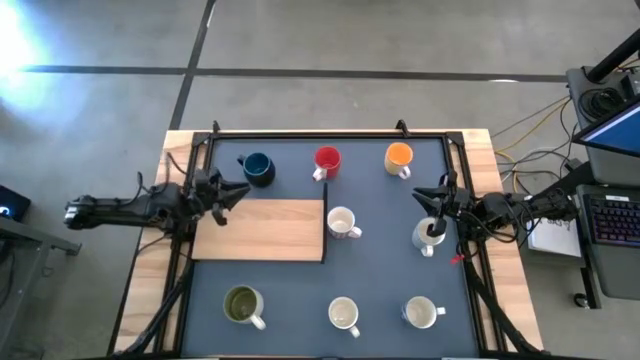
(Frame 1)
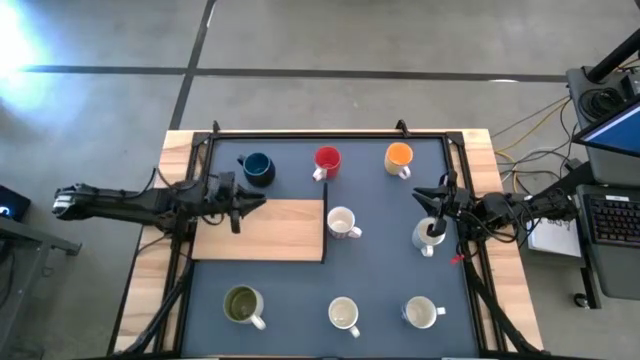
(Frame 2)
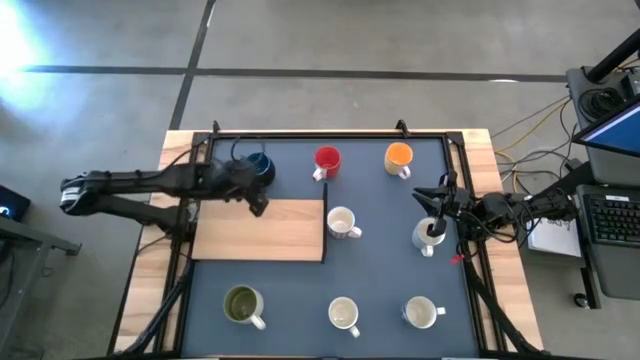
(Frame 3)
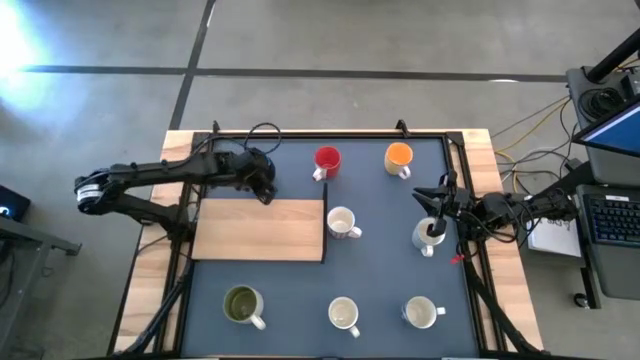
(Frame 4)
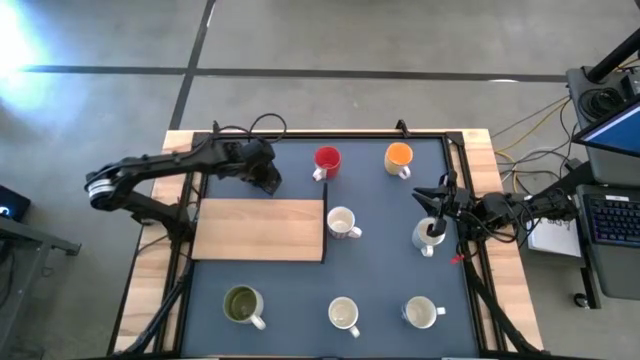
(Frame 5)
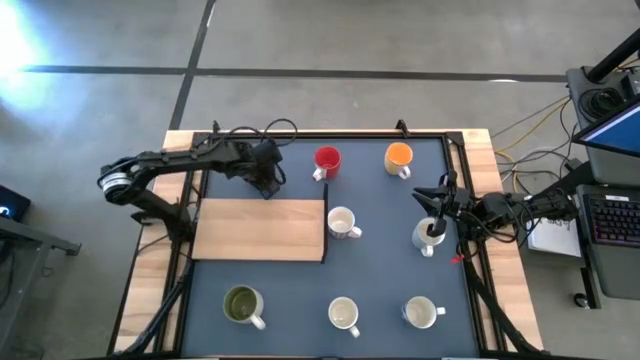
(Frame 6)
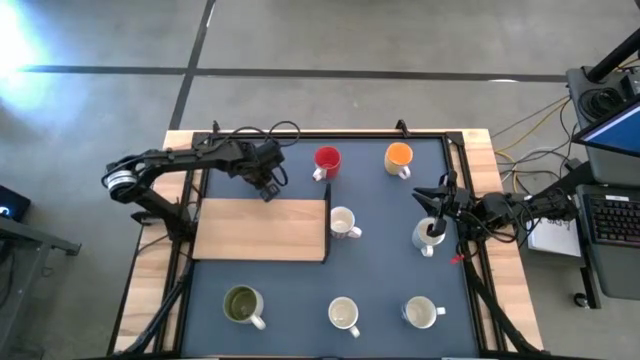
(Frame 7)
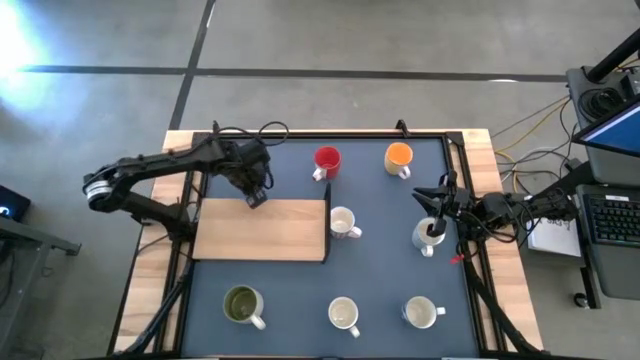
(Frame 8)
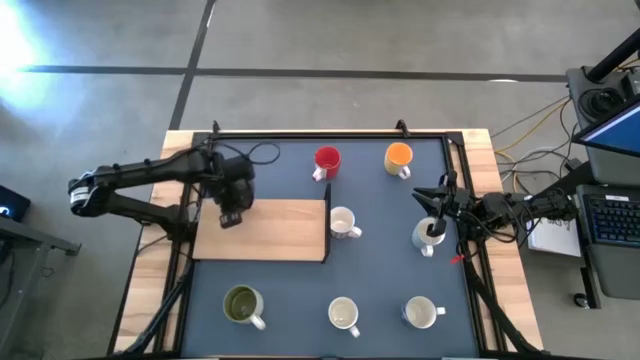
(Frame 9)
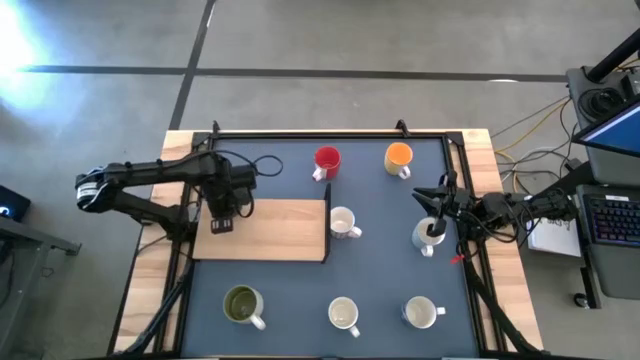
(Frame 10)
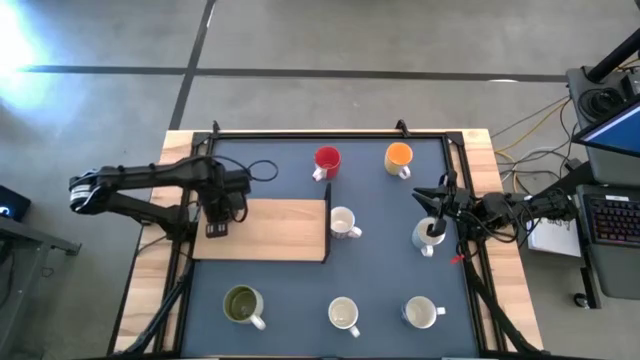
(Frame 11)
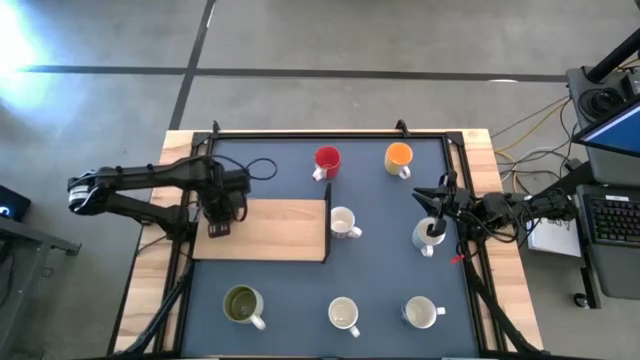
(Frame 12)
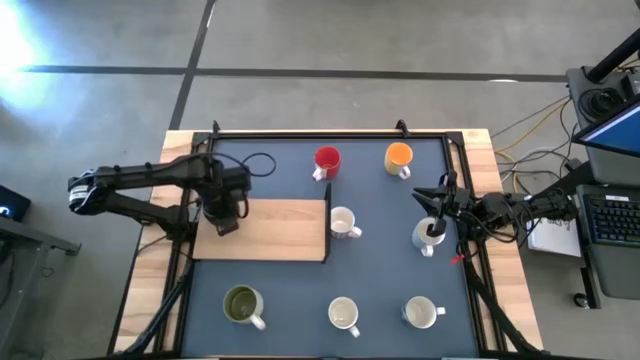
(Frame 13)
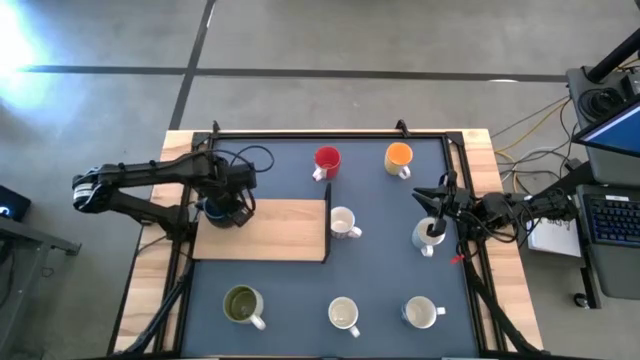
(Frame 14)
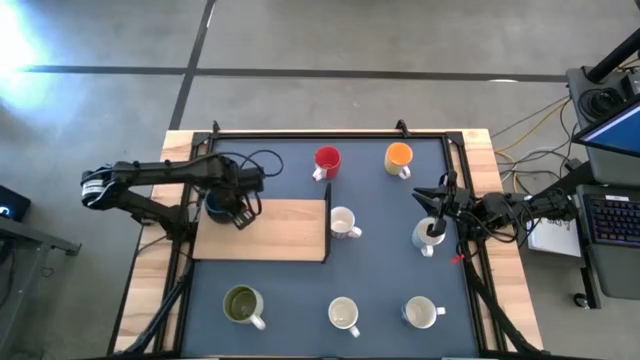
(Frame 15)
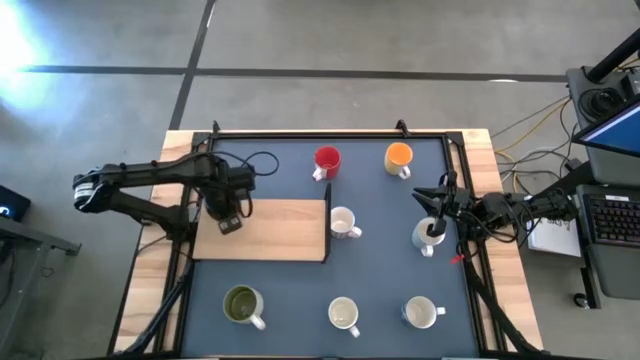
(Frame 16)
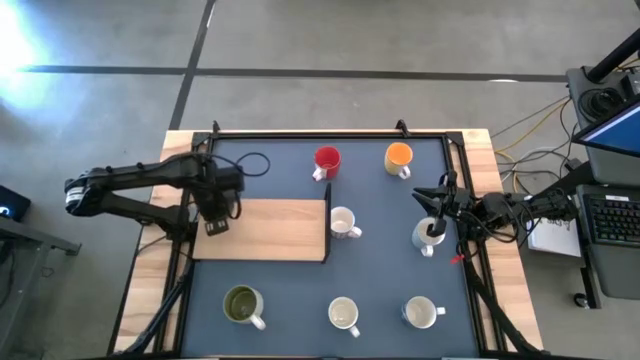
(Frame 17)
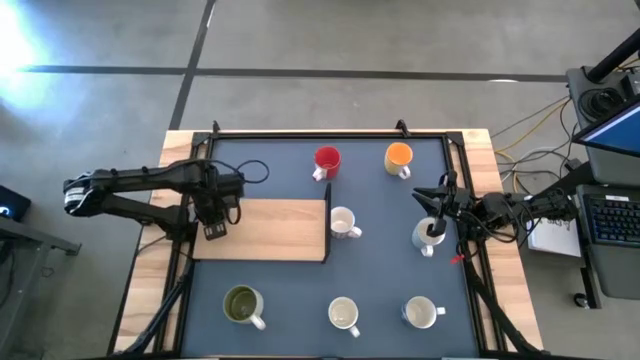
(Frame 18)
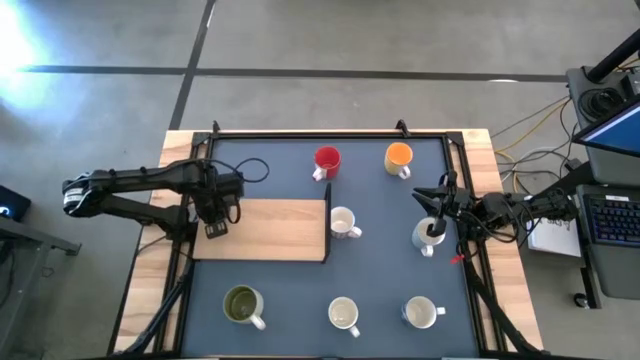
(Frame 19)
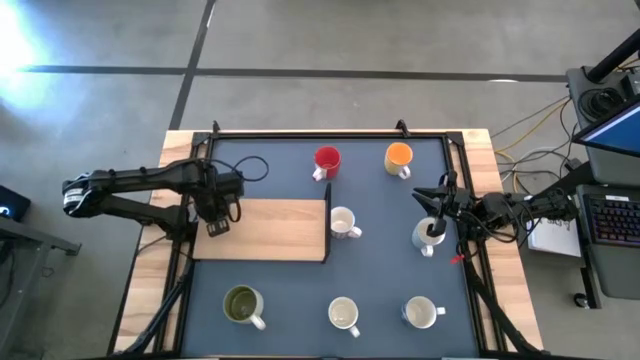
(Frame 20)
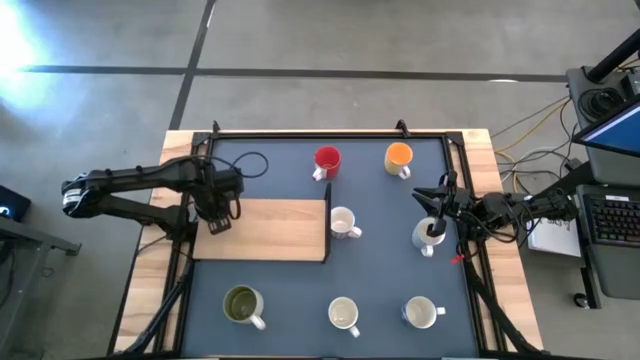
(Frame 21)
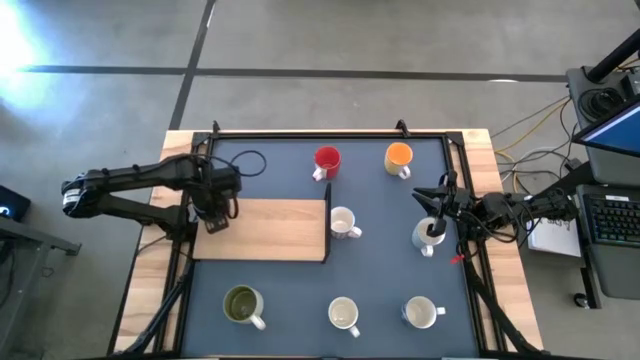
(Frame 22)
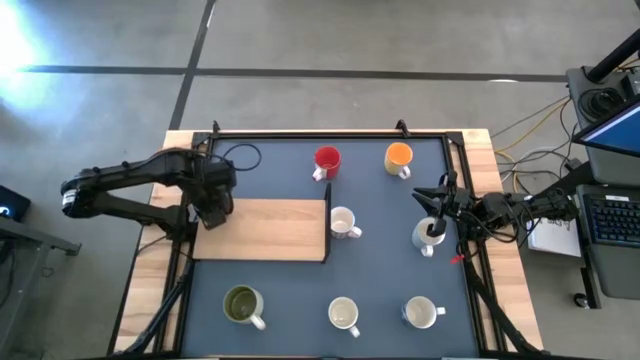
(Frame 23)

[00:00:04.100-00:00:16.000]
Task: Place coffee mugs
Put the black mug on the shelf

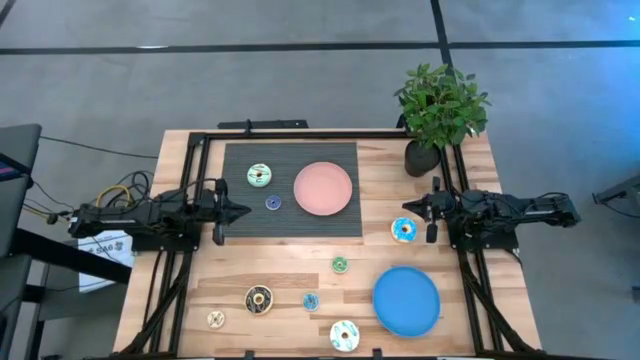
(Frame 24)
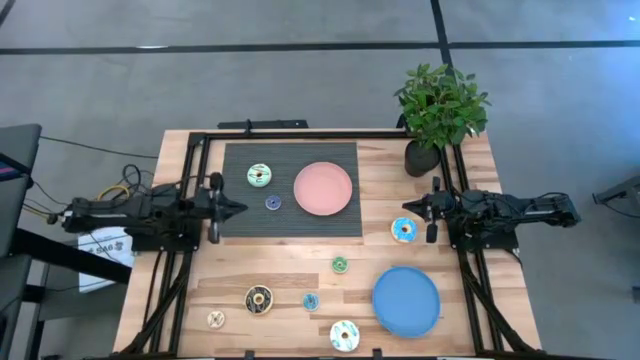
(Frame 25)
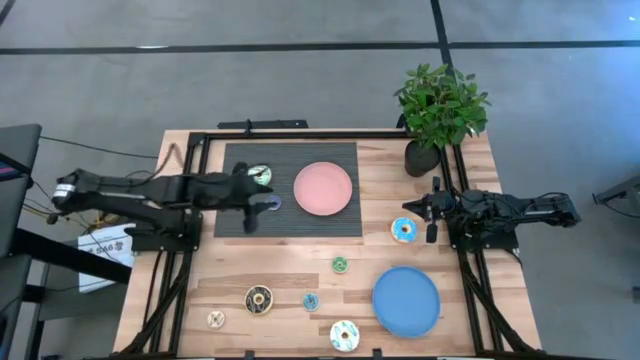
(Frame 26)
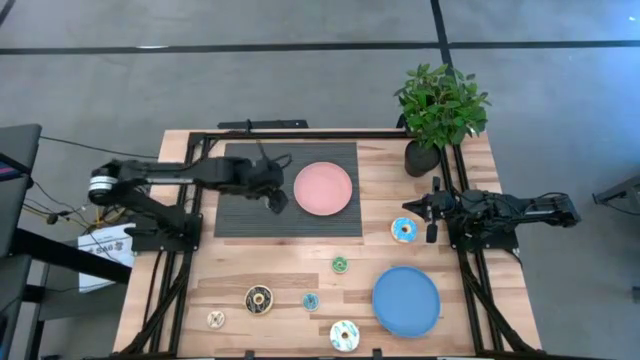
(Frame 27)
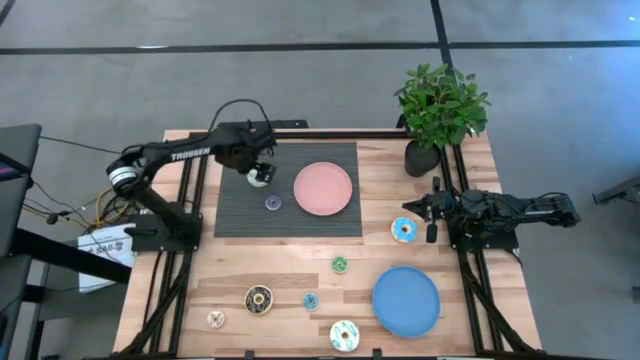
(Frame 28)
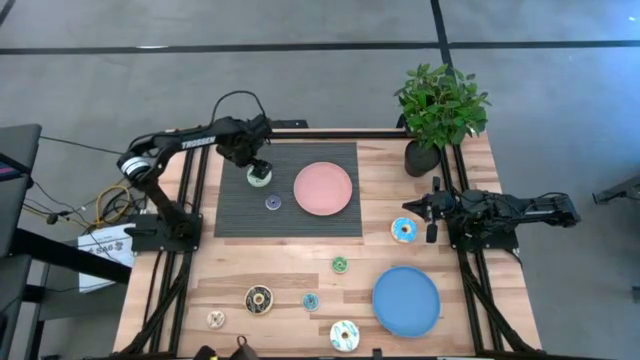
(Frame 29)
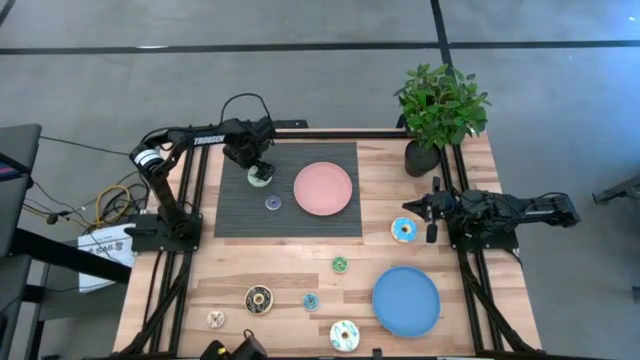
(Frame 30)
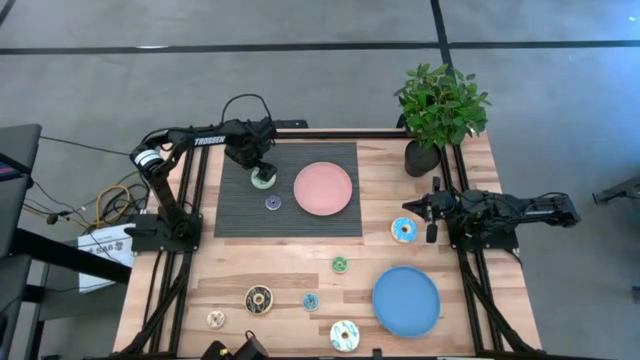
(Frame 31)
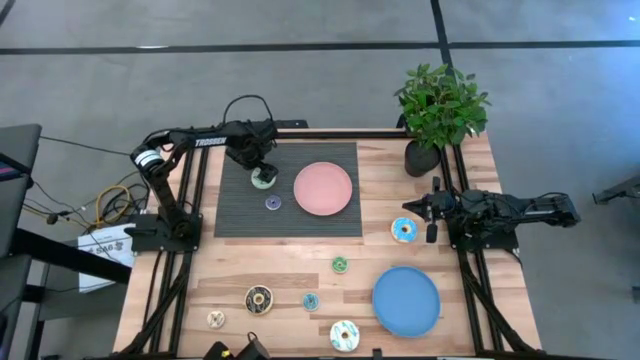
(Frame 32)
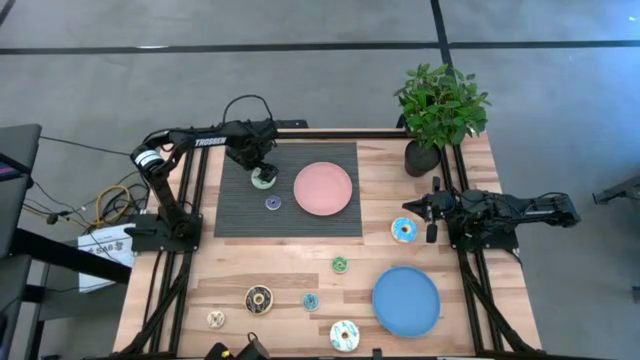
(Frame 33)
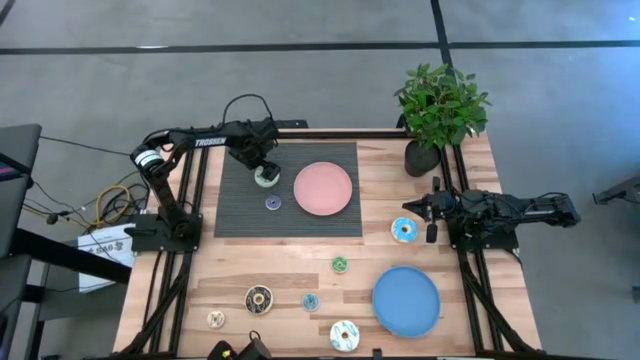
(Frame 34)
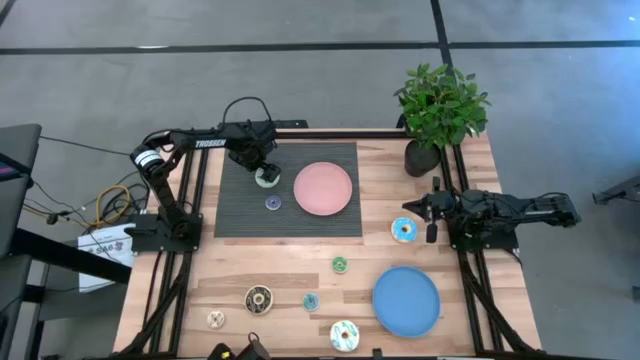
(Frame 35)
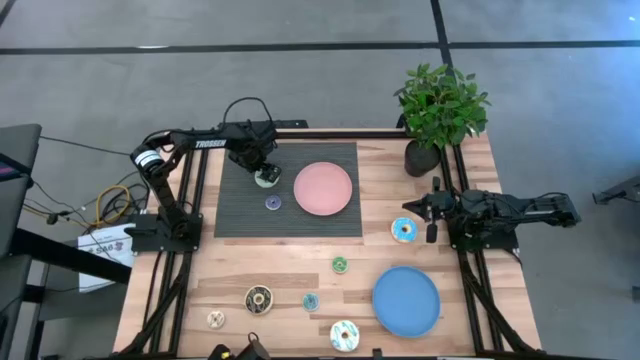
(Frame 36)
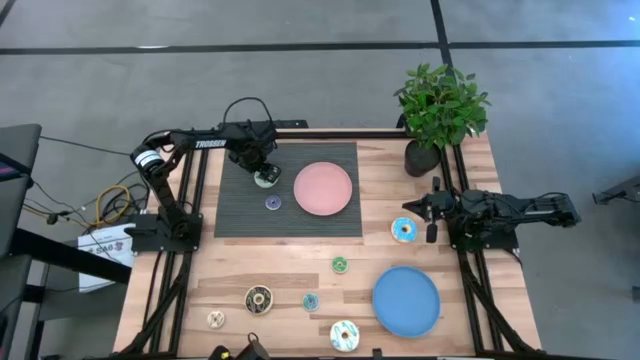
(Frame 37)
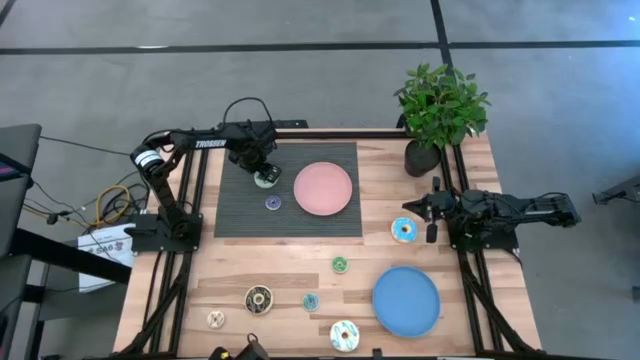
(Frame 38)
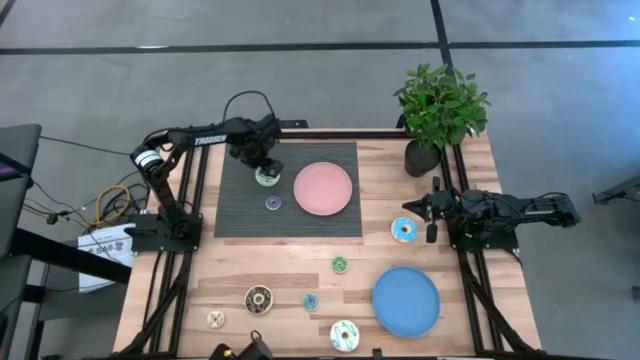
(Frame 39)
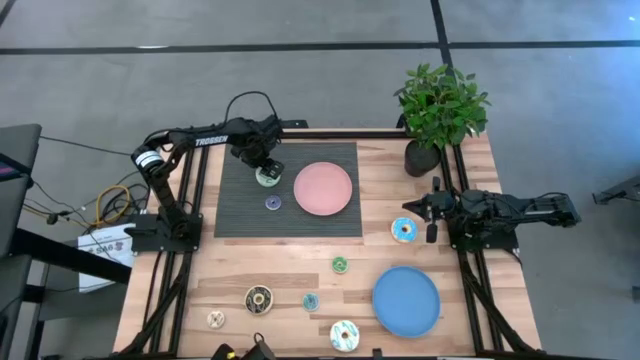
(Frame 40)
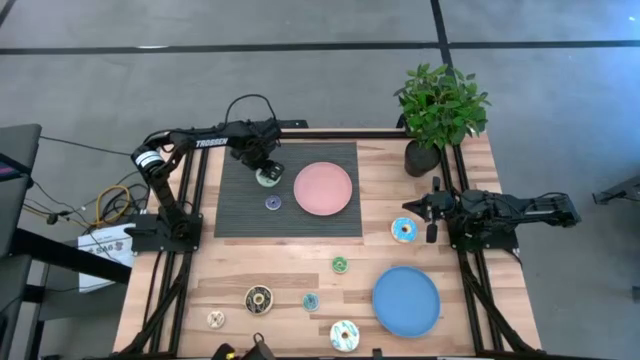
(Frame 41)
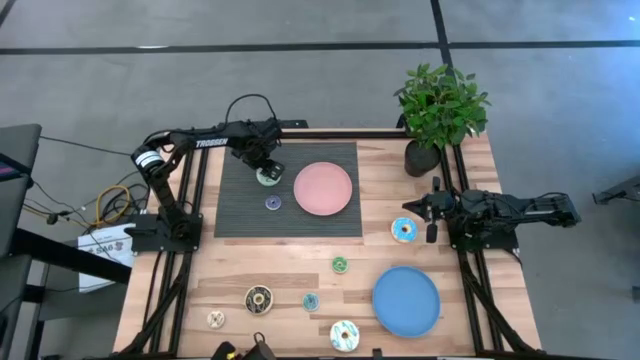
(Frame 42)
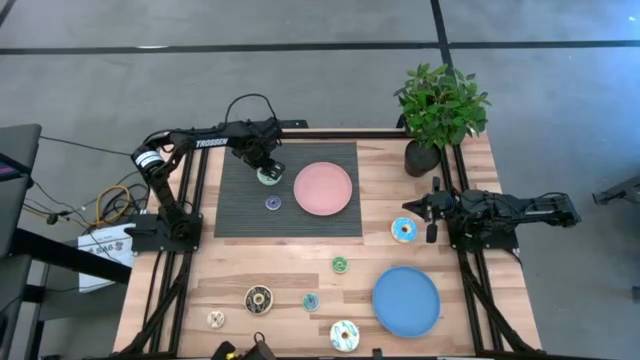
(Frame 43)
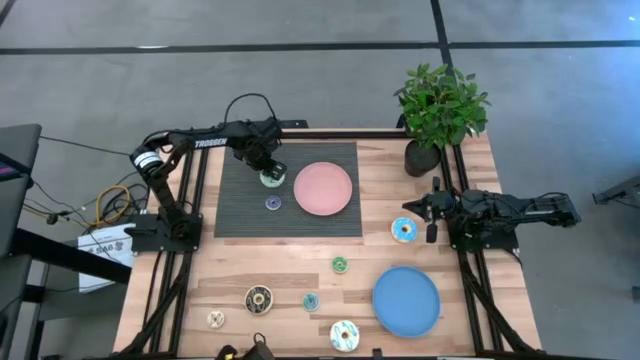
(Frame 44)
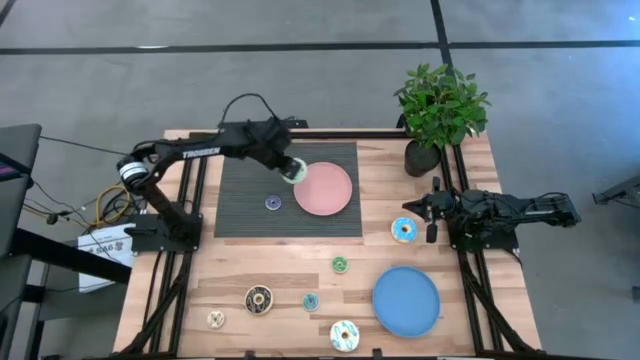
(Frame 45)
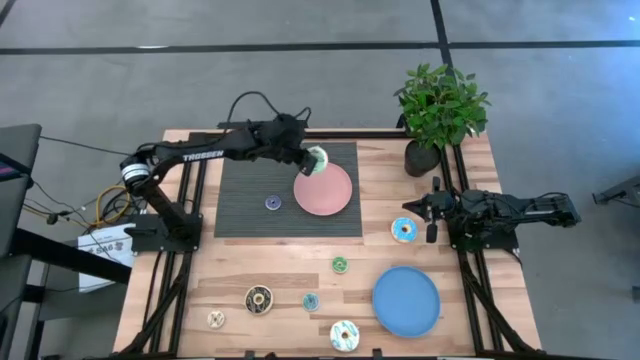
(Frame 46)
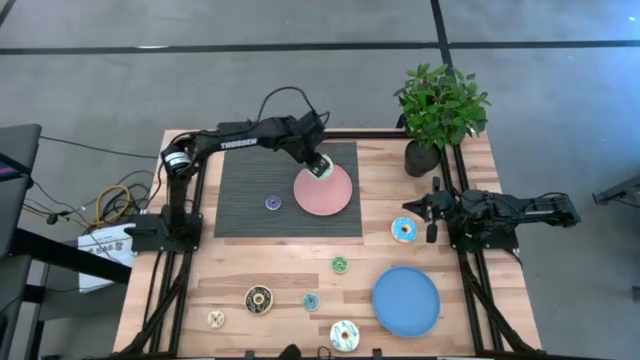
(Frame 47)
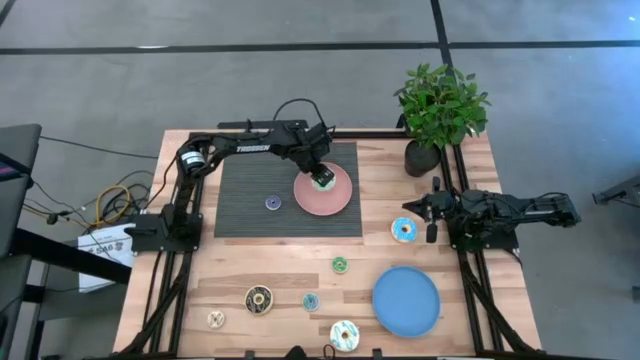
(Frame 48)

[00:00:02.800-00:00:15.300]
Task: Pick & Place donuts
Put the big light blue donut on the pink plate
